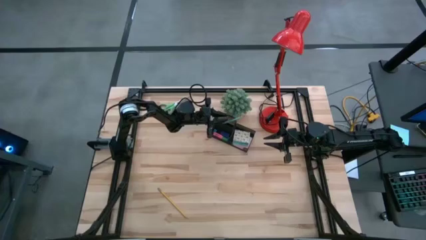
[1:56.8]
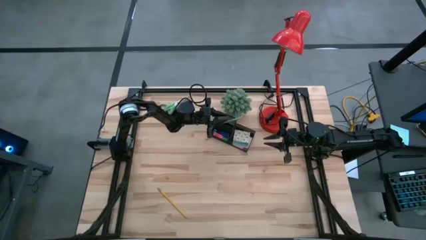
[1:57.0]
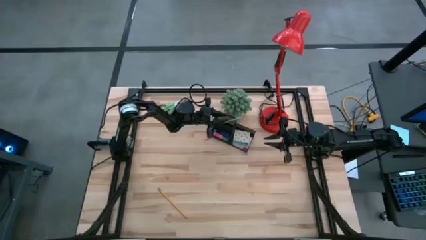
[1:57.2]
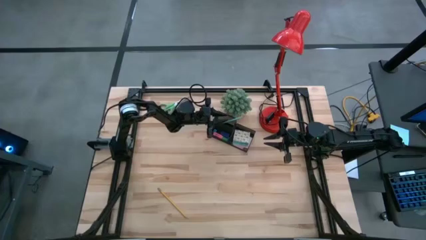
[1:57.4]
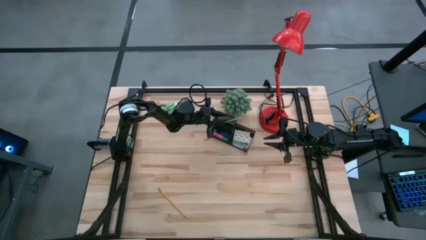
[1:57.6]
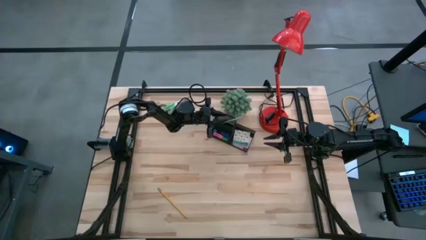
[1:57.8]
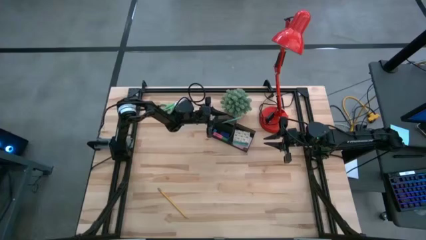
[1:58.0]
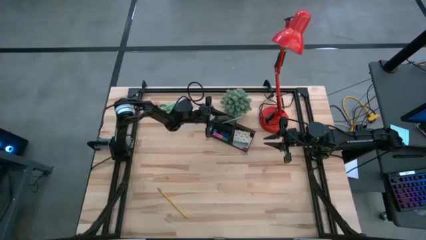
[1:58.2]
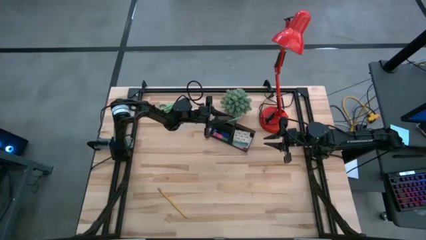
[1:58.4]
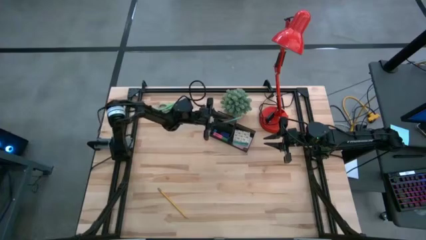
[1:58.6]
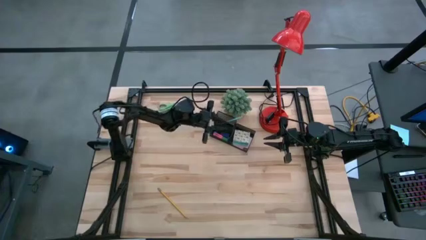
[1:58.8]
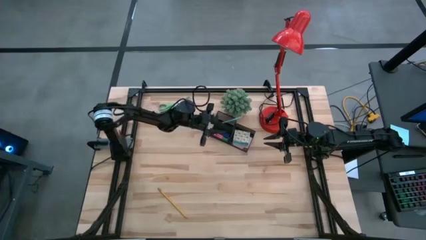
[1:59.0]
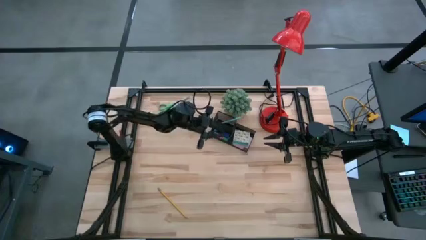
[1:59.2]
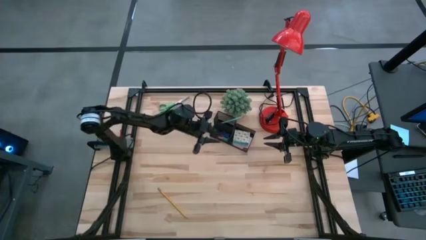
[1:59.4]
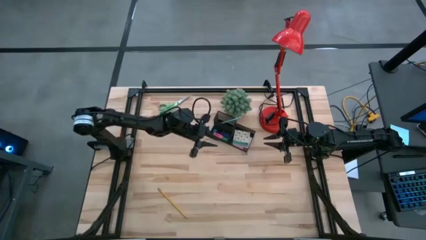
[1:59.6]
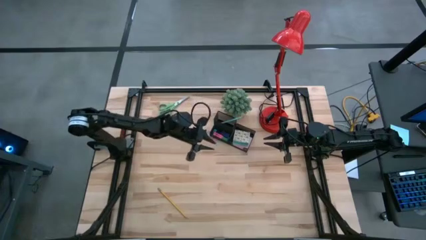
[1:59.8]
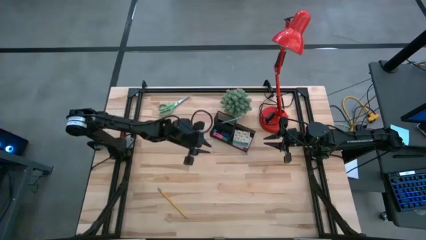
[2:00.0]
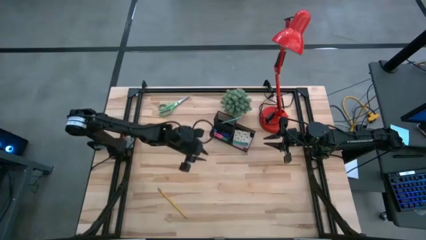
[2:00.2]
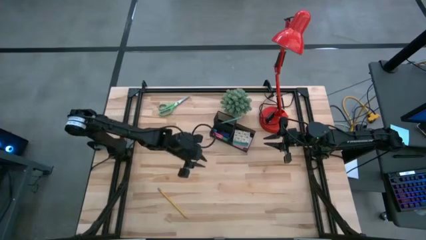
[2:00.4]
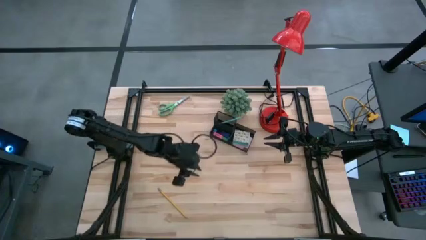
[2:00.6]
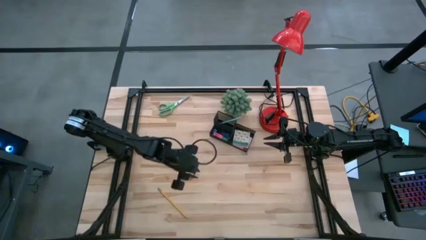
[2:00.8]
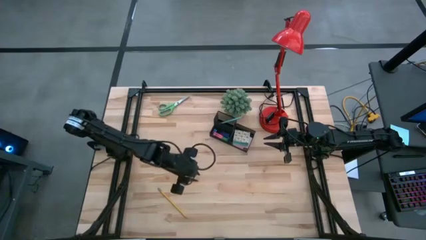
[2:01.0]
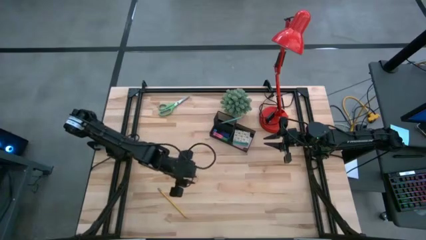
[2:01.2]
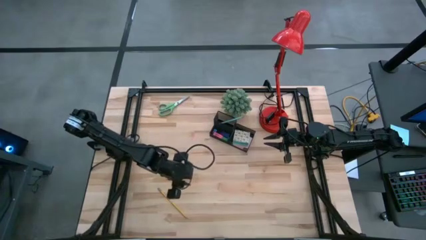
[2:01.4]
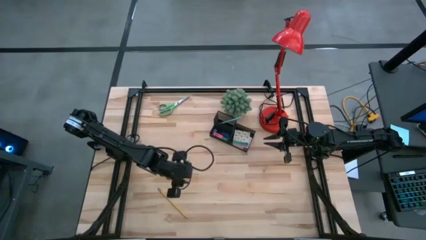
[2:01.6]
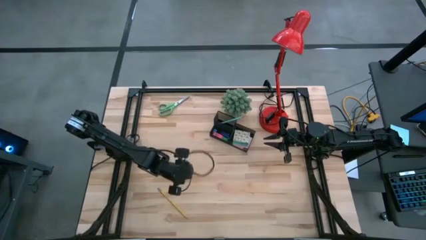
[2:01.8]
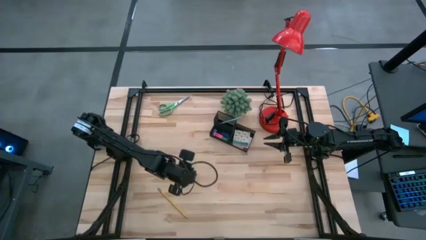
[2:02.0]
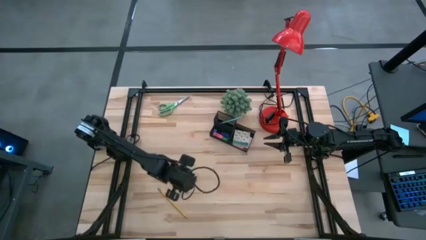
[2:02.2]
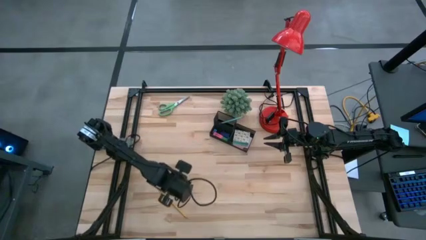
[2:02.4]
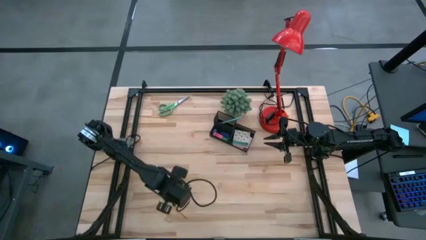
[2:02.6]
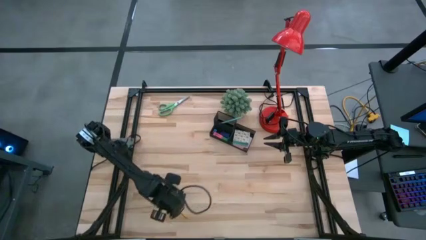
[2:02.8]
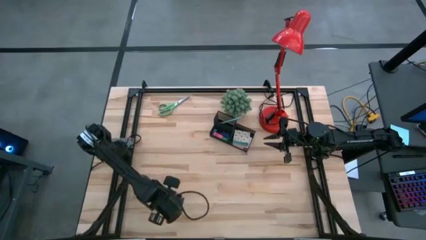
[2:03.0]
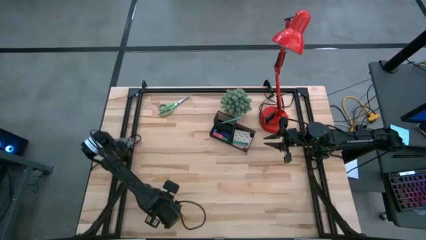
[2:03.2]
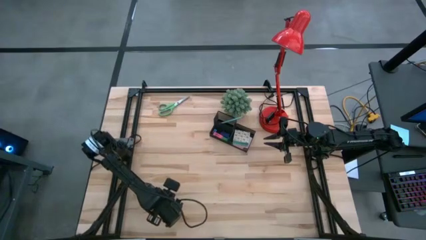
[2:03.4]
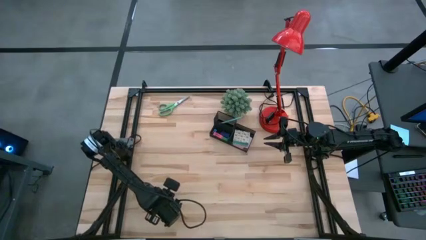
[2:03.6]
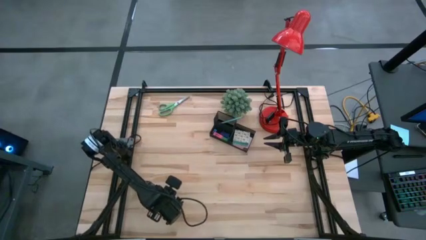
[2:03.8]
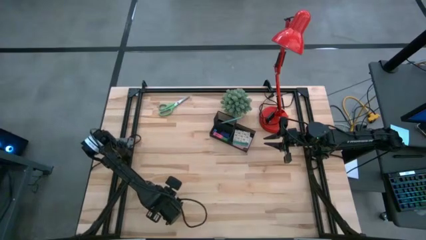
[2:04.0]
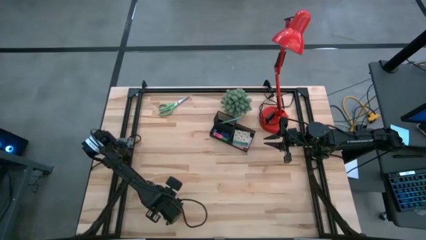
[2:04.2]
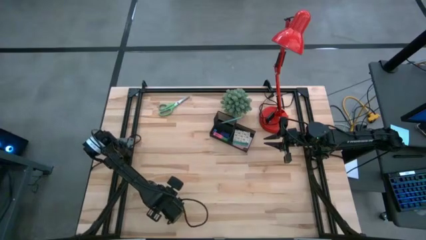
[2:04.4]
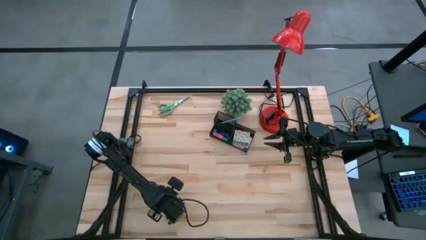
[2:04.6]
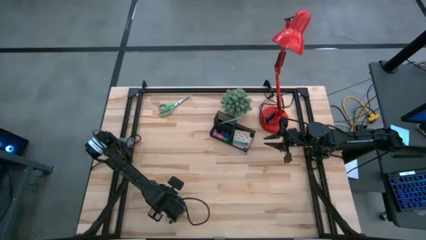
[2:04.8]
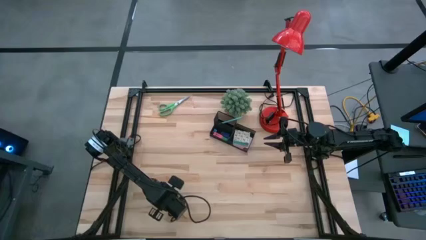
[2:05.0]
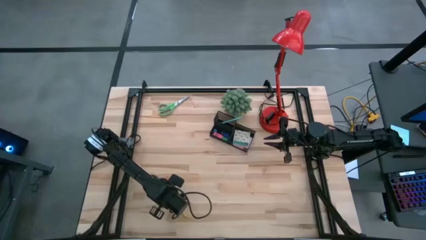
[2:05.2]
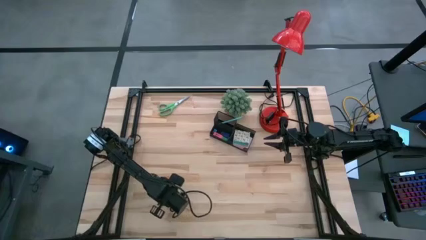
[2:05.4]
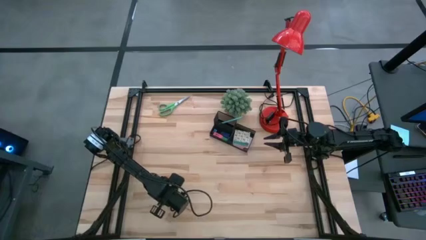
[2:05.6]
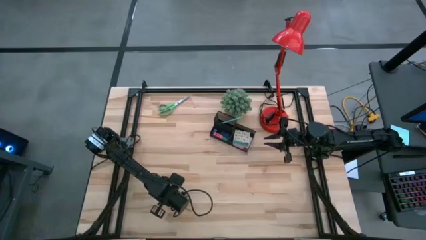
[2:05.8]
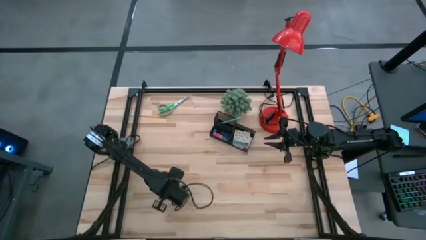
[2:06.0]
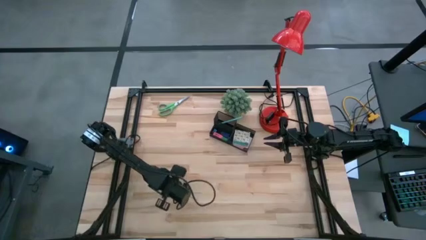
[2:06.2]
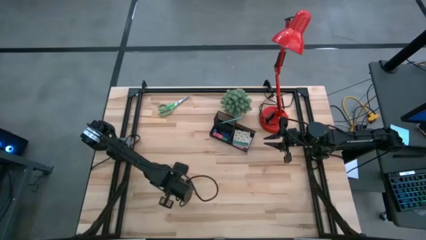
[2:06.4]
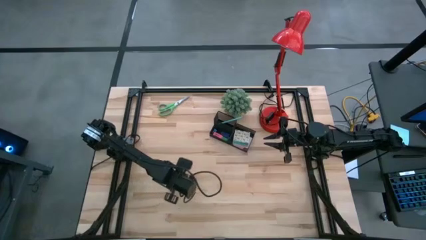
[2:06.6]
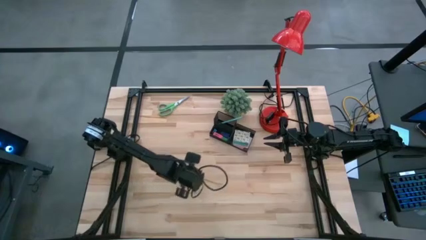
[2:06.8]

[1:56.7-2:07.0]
Task: Pick and place office supplies into organizer
Put the yellow pencil into the black desk organizer
